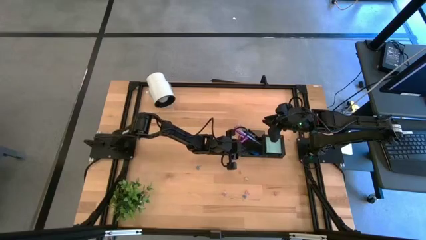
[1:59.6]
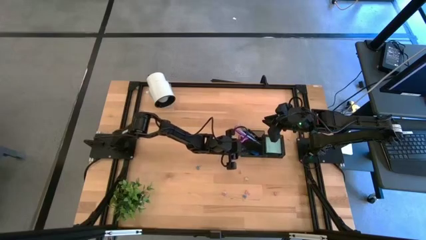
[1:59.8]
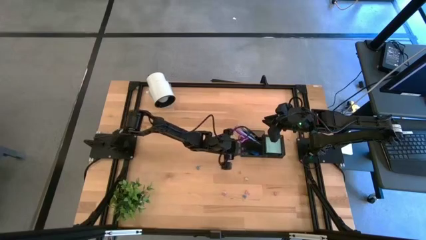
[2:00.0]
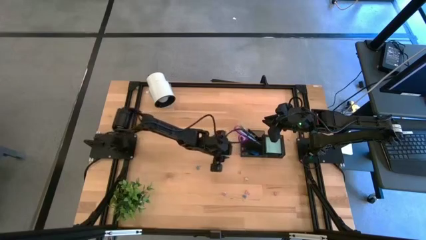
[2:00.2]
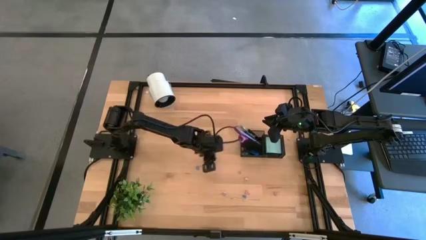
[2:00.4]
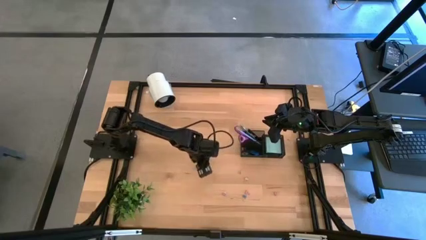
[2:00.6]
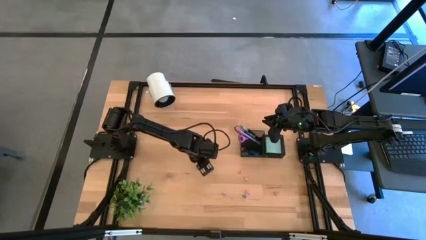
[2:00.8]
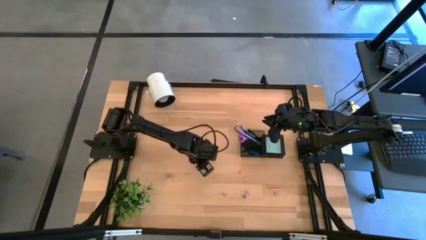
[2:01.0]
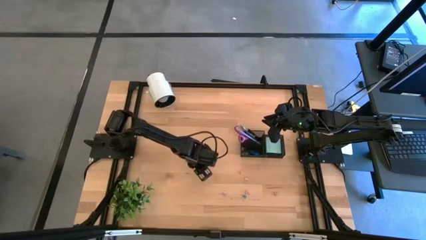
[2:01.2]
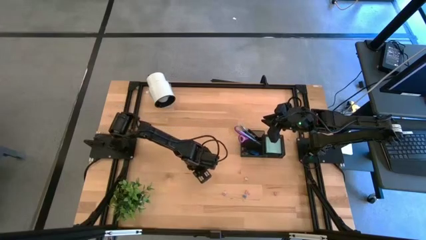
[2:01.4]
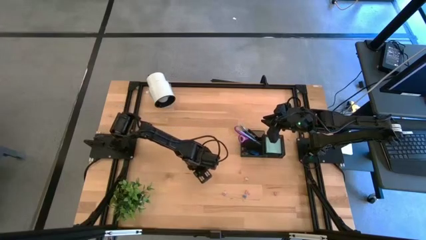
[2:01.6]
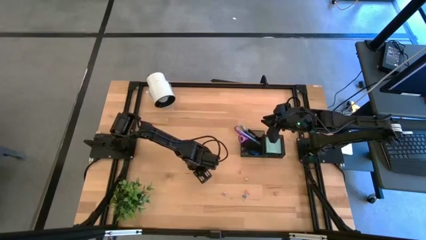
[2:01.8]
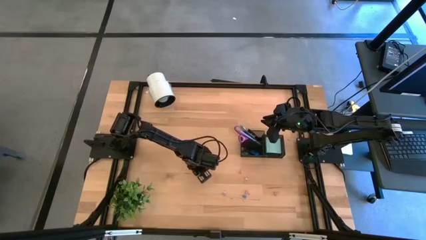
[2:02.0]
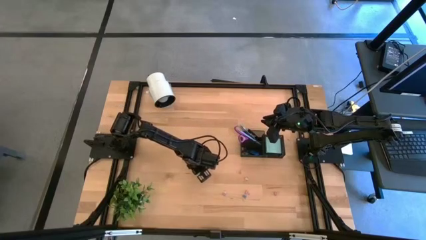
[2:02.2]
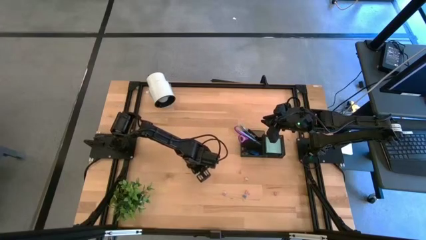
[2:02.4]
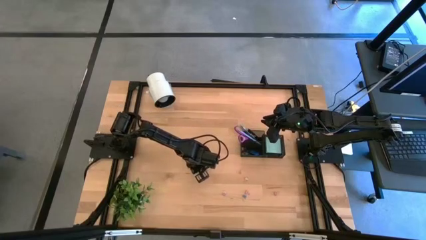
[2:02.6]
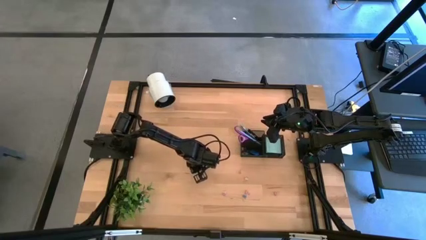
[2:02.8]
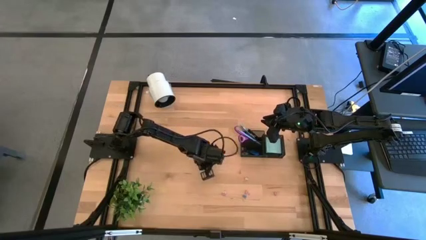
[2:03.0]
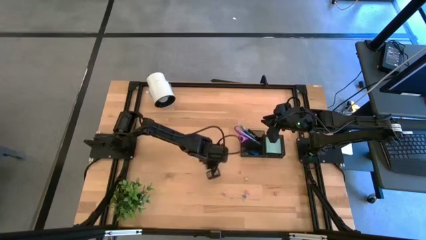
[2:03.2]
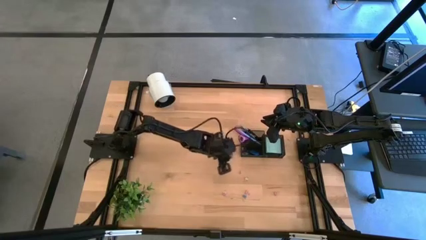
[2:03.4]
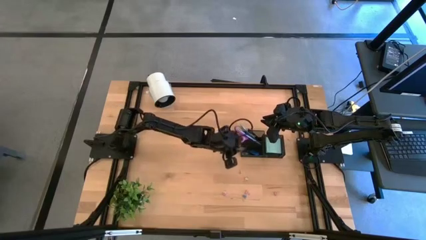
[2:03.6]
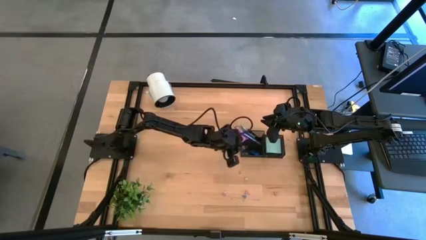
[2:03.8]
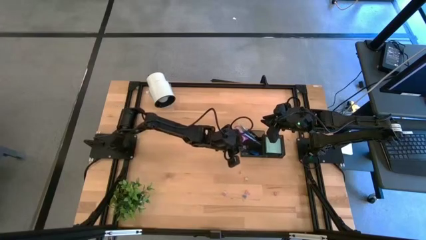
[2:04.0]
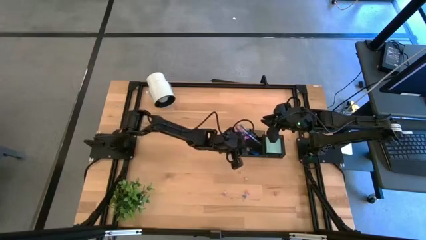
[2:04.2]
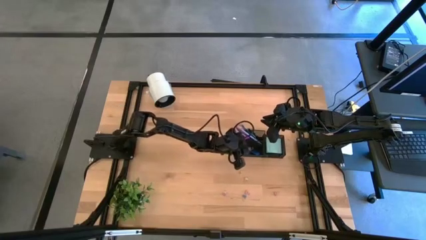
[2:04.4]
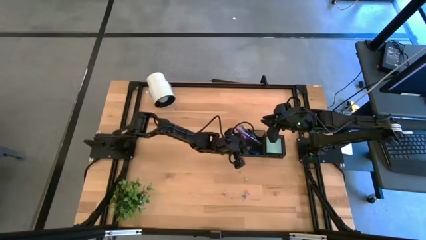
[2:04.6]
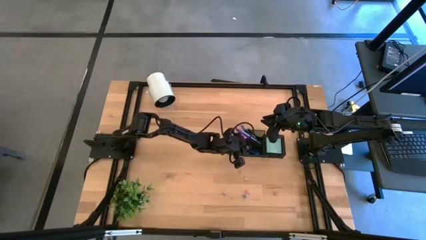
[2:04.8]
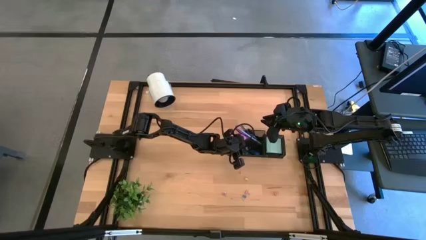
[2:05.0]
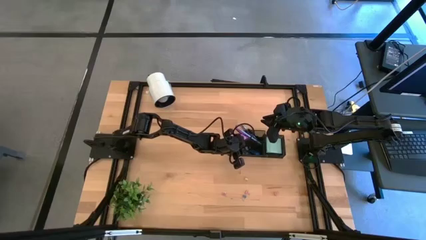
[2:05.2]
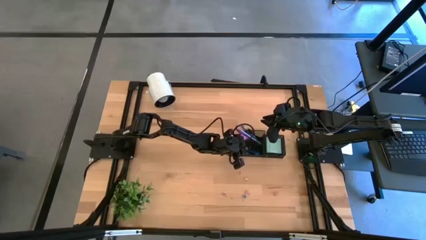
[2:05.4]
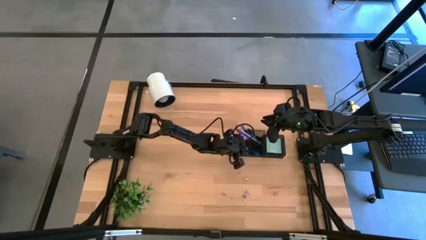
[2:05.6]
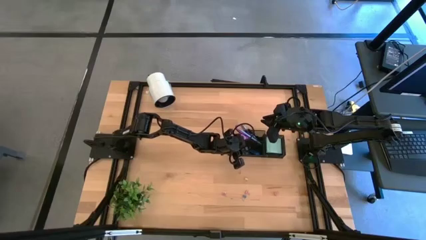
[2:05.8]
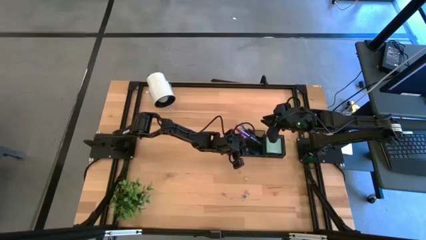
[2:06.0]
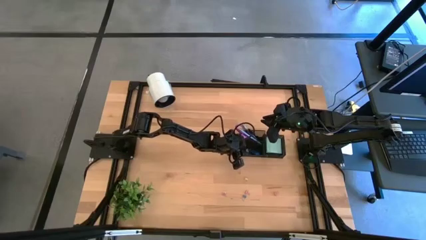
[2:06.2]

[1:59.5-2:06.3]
Task: Pick and place office supplies into organizer
Put the blue binder clip into the black desk organizer

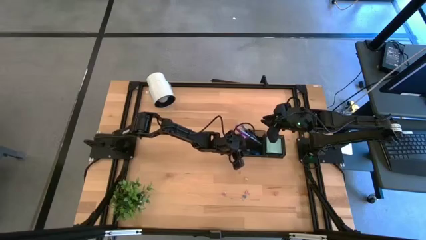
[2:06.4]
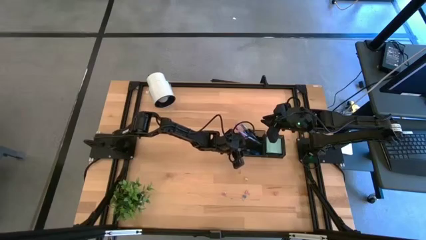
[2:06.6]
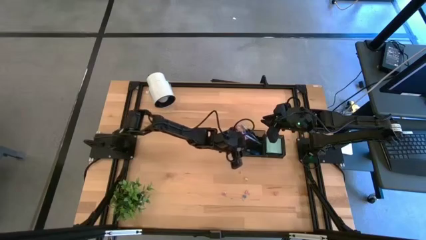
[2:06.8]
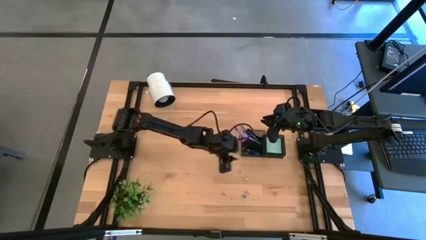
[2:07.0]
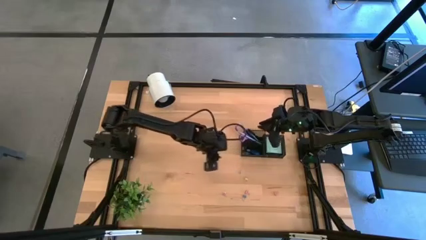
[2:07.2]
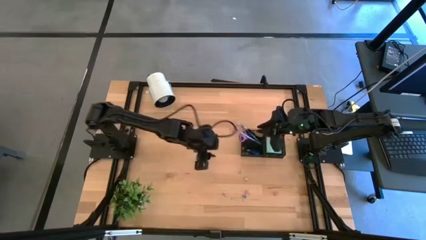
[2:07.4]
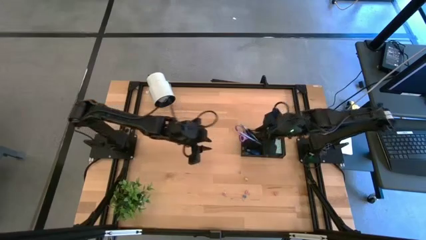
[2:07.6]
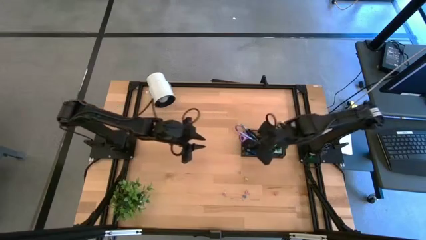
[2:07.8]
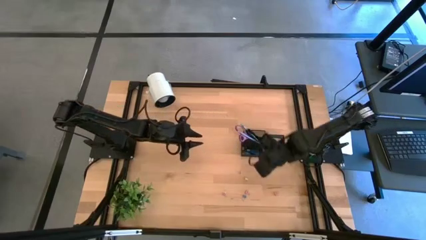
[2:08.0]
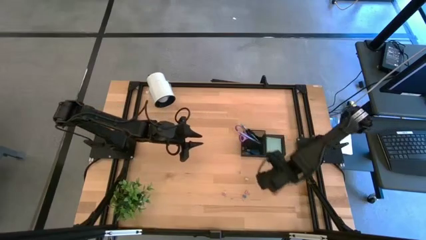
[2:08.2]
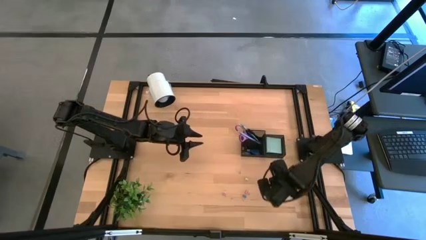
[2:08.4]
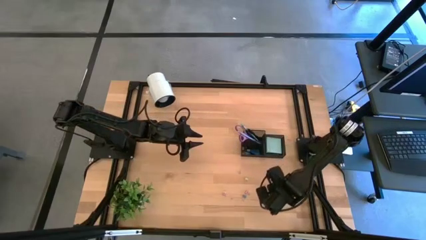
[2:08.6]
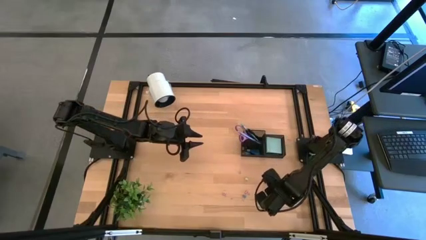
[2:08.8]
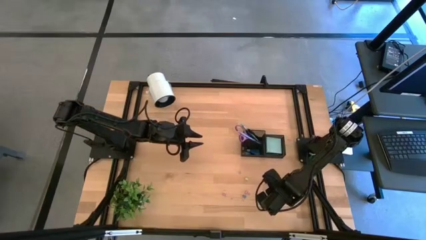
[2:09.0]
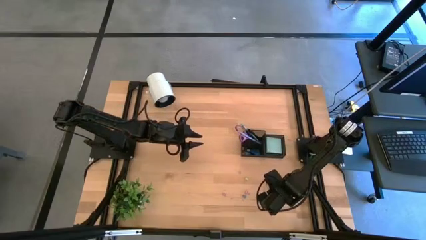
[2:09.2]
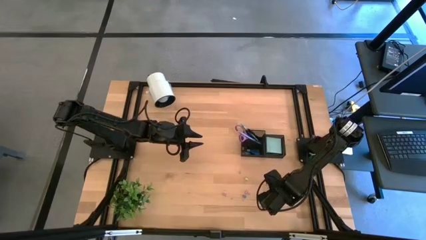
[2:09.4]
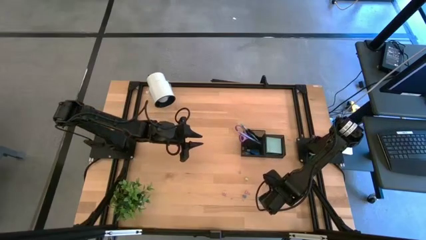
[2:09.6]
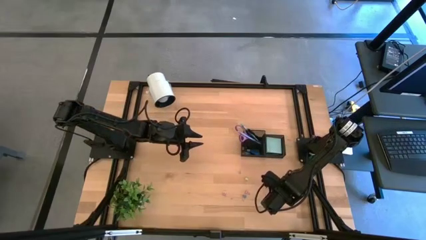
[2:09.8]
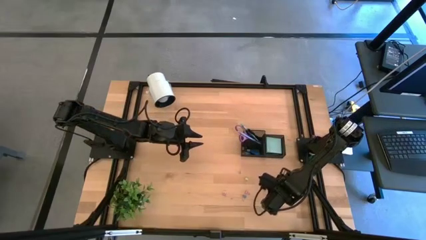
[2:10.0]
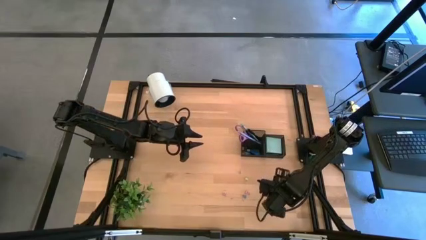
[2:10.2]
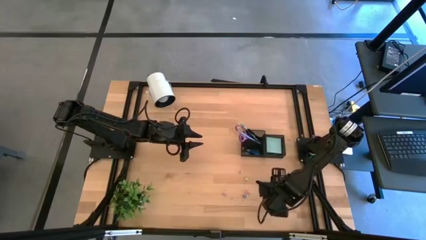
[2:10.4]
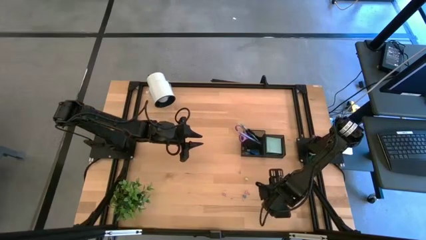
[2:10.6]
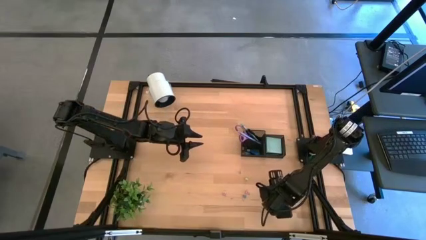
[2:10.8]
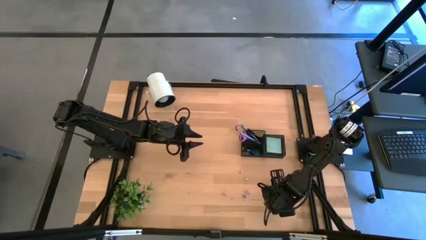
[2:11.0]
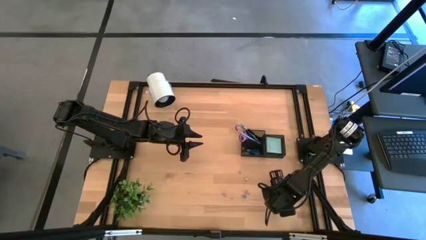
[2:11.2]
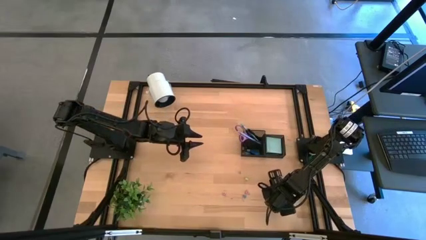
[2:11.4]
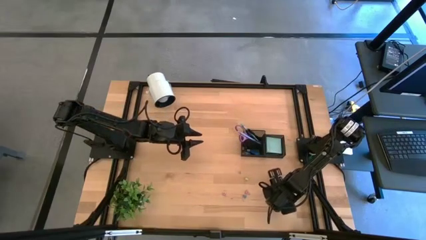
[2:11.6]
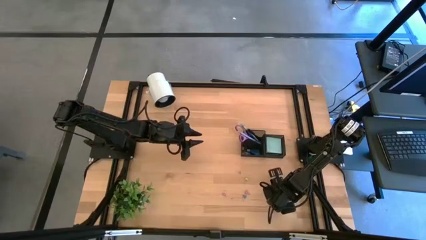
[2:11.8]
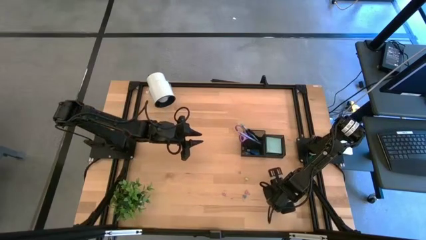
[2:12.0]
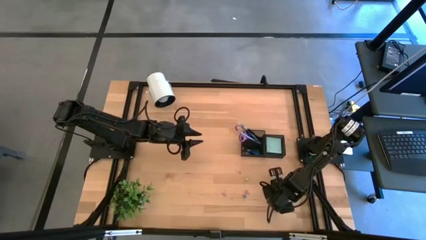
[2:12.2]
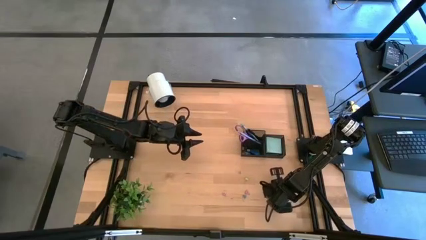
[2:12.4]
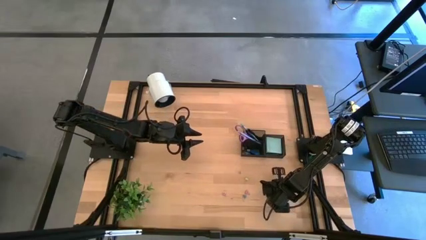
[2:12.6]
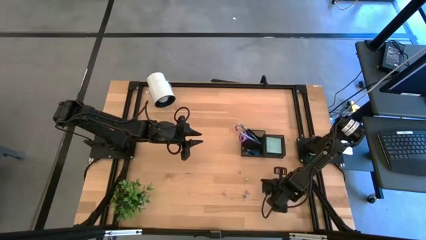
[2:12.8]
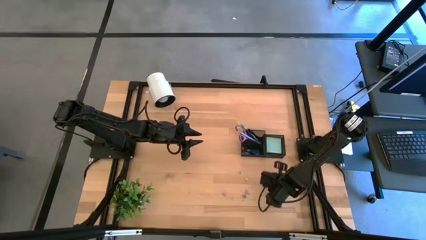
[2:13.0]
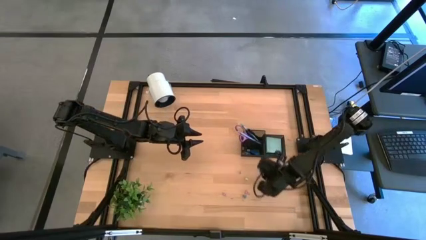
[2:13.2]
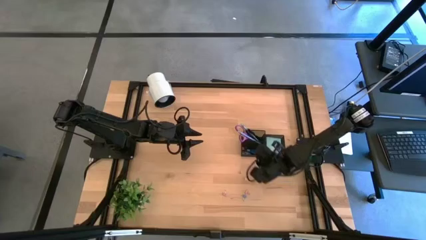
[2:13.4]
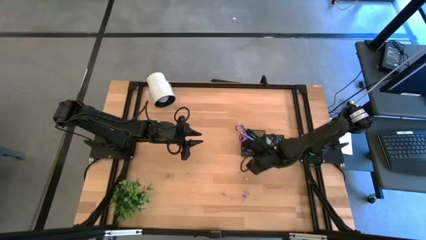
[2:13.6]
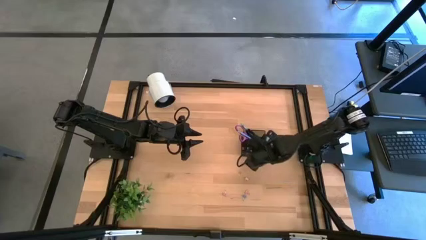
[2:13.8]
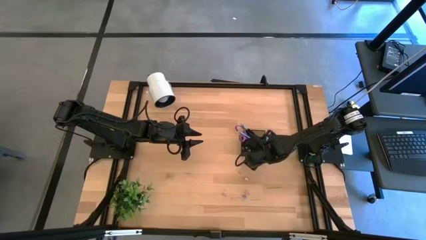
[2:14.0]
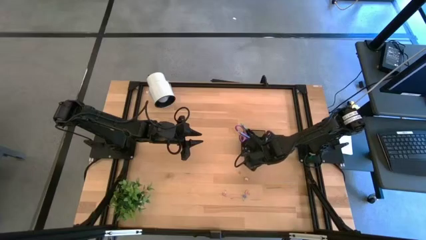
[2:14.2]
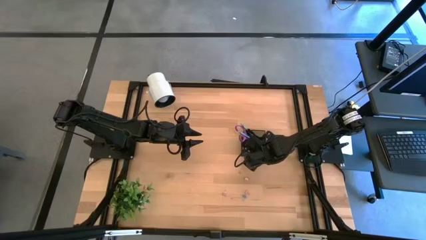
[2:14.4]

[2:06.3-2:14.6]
Put the pink binder clip into the black desk organizer

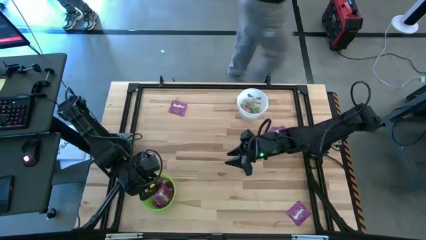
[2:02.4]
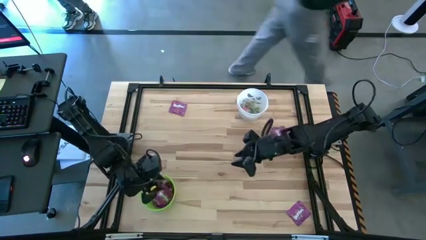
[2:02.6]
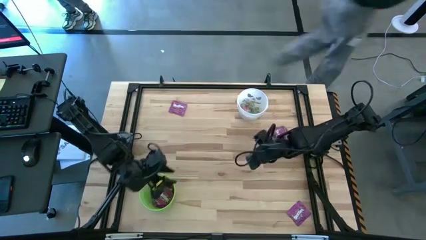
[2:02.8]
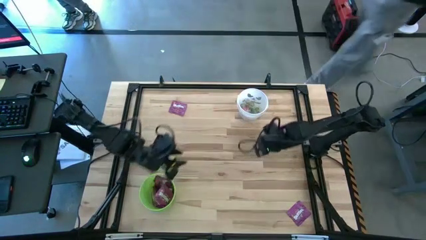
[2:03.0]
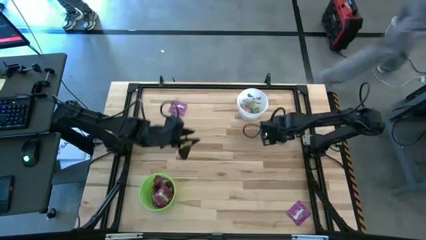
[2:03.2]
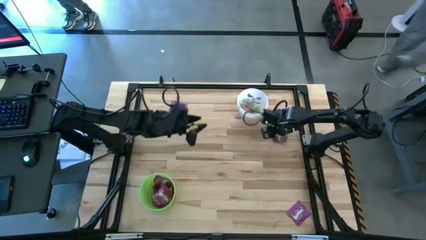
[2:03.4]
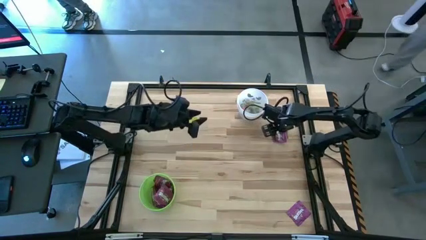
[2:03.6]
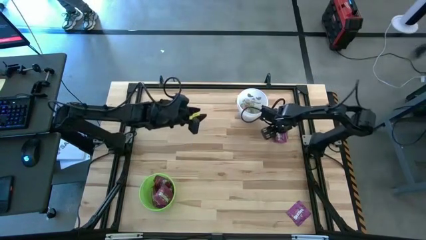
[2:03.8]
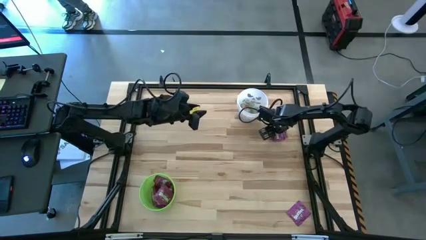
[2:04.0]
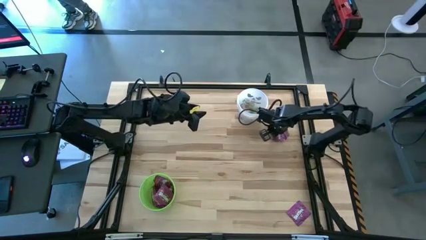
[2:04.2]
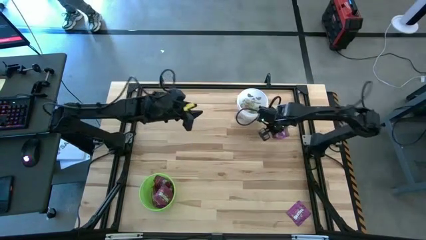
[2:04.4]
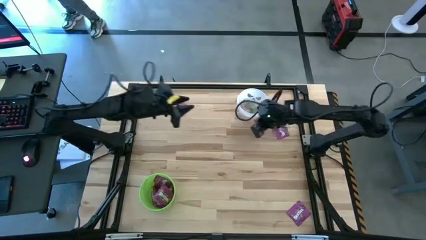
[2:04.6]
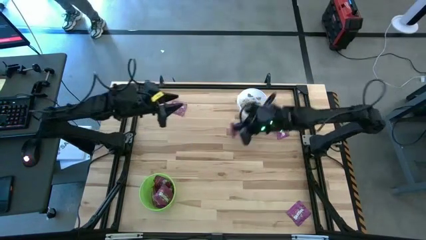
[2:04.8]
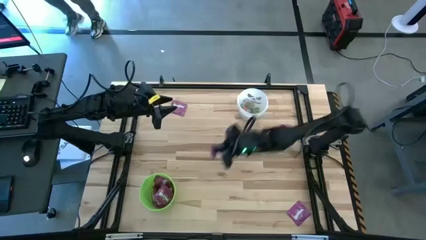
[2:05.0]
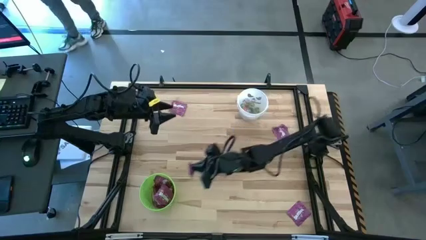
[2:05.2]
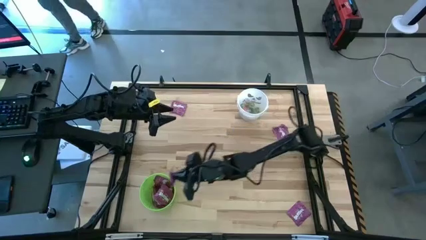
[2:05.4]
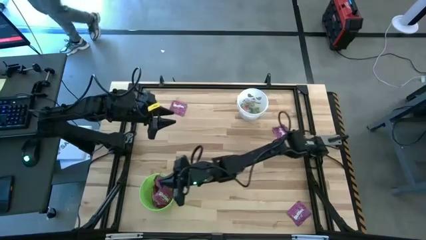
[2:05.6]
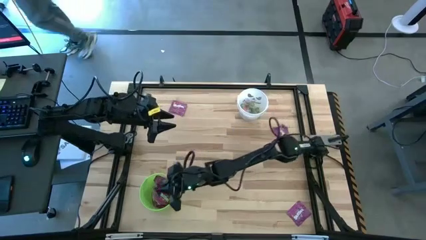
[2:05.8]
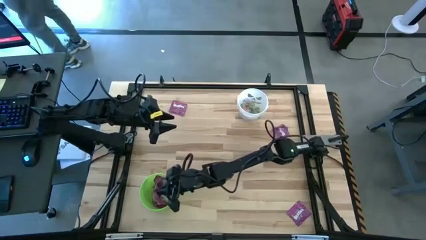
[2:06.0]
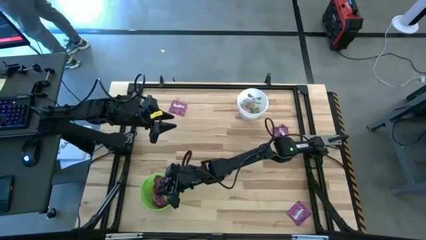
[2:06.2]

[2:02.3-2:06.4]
Task: Sort candy by brand, put in halloween buckets
Put the purple candy into the green bucket
